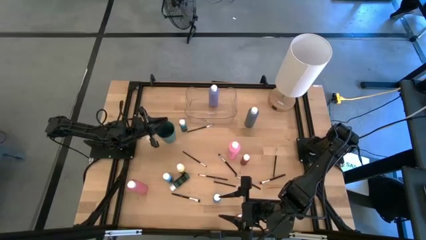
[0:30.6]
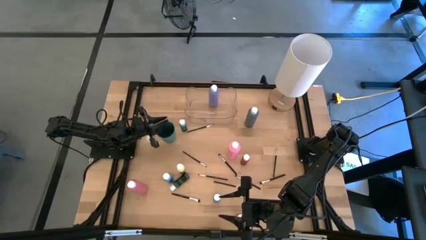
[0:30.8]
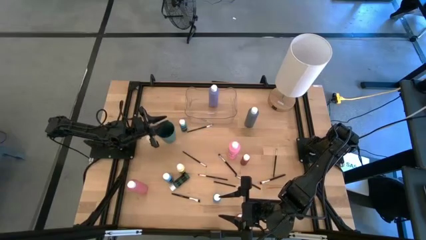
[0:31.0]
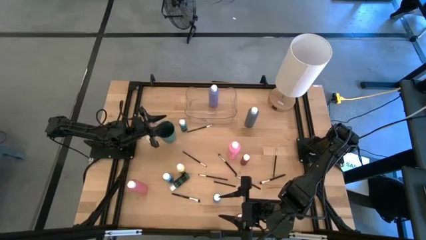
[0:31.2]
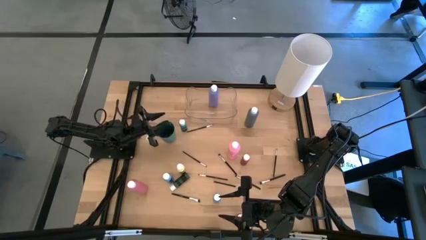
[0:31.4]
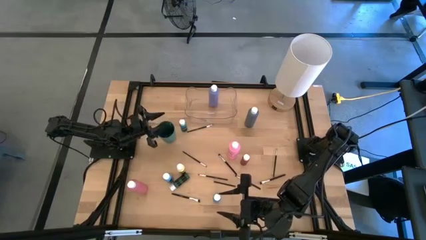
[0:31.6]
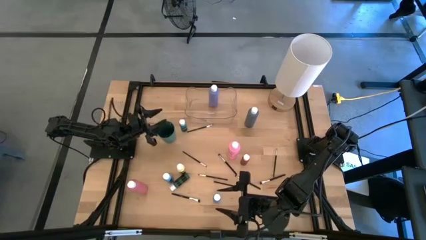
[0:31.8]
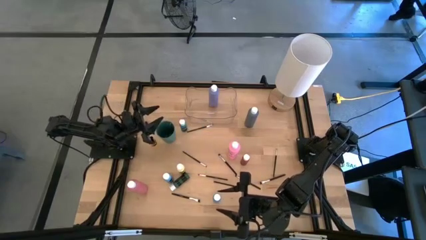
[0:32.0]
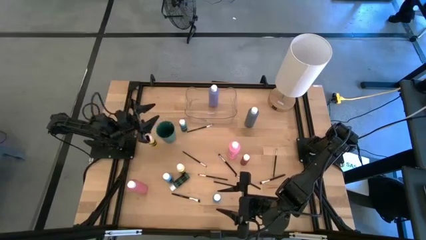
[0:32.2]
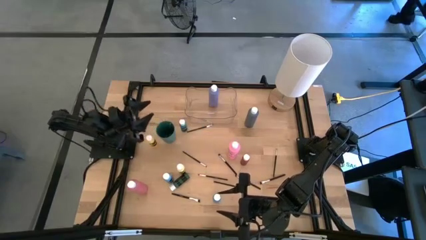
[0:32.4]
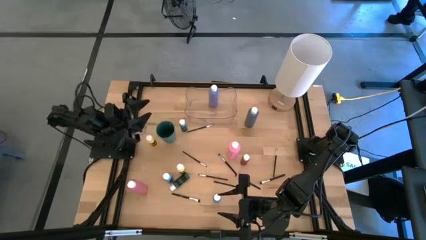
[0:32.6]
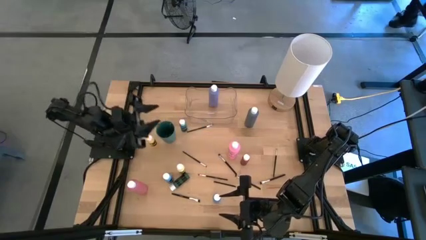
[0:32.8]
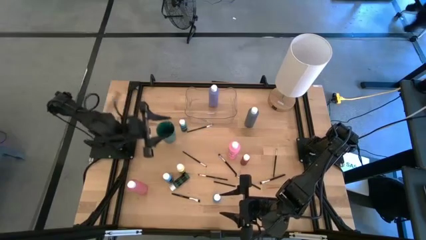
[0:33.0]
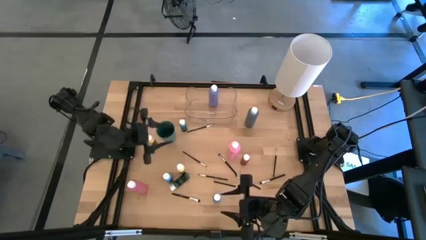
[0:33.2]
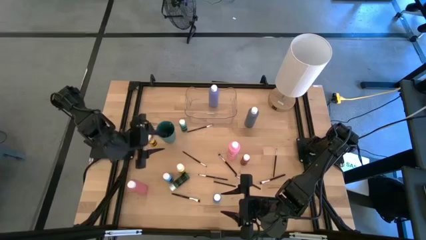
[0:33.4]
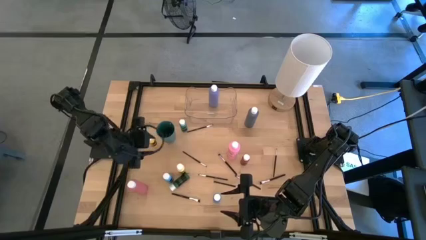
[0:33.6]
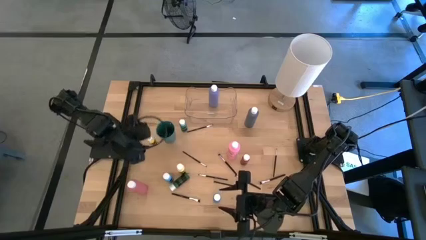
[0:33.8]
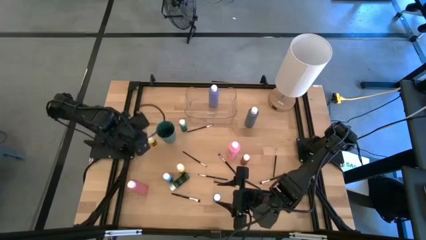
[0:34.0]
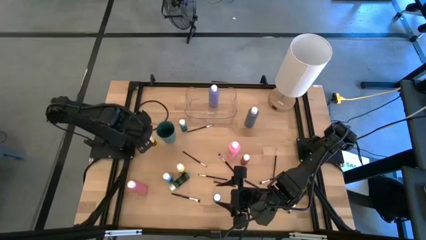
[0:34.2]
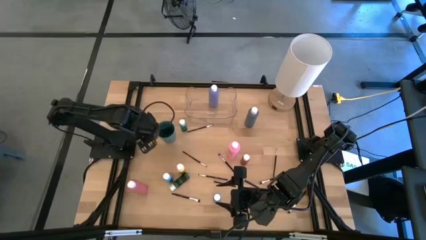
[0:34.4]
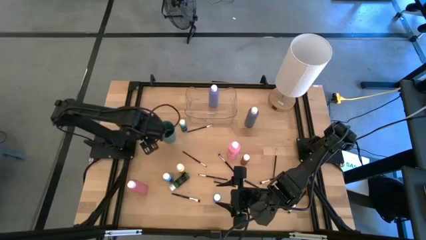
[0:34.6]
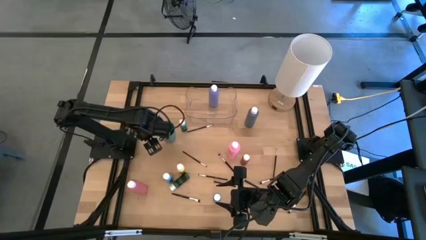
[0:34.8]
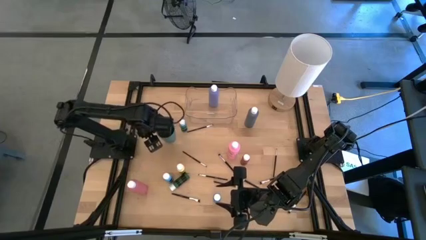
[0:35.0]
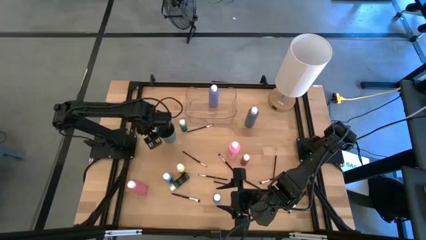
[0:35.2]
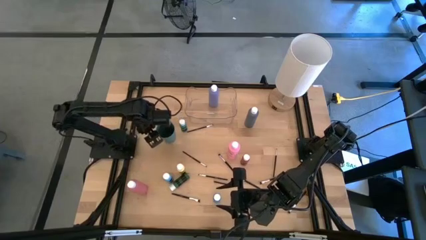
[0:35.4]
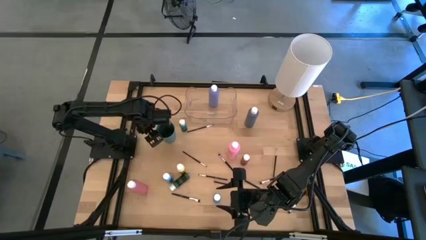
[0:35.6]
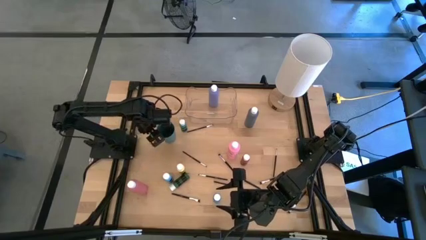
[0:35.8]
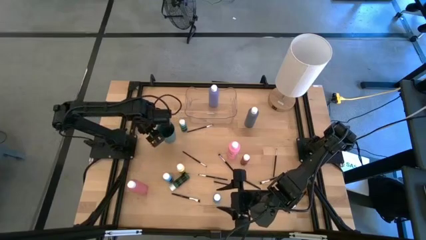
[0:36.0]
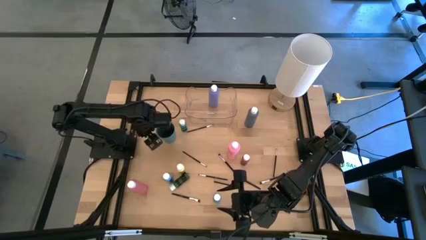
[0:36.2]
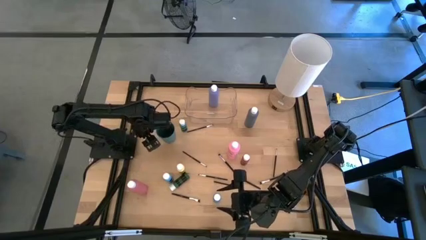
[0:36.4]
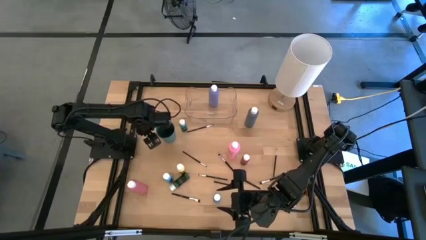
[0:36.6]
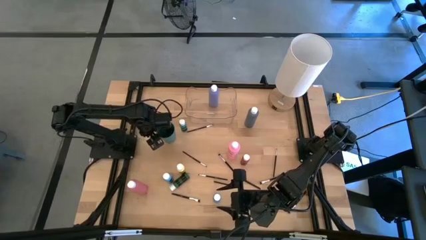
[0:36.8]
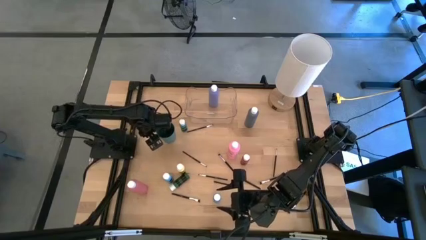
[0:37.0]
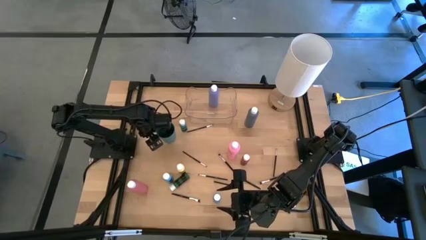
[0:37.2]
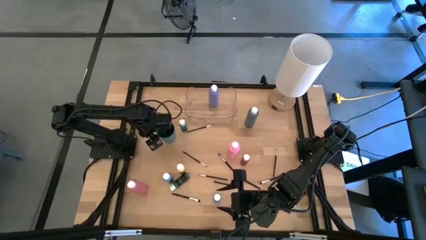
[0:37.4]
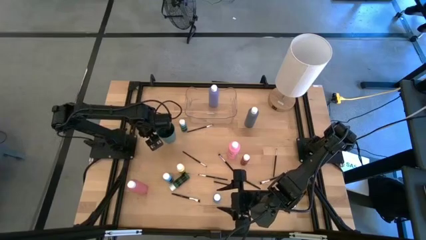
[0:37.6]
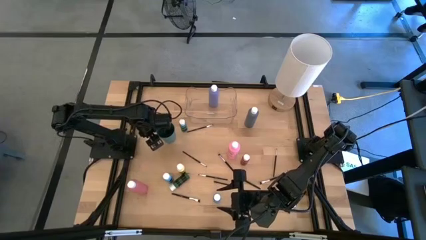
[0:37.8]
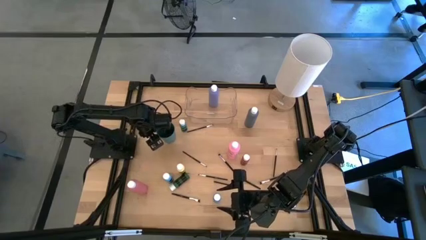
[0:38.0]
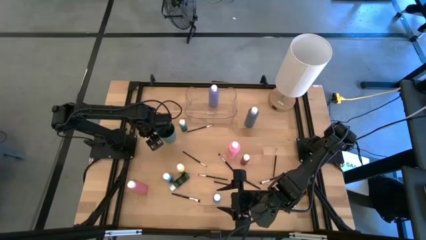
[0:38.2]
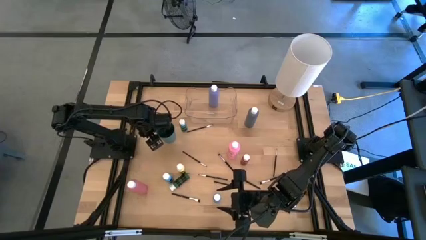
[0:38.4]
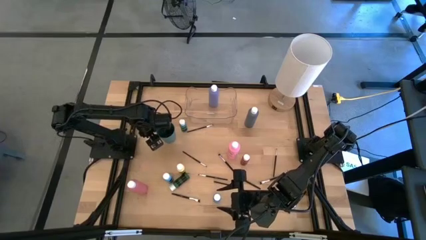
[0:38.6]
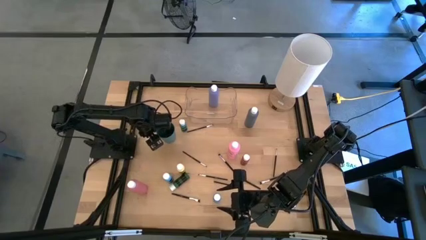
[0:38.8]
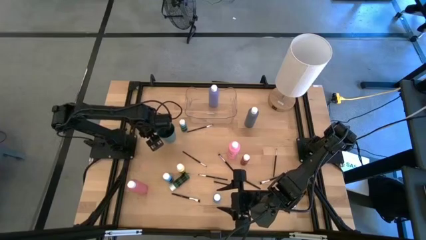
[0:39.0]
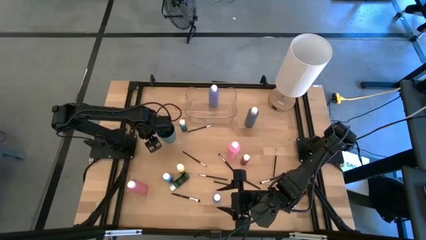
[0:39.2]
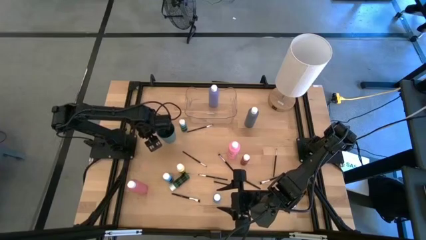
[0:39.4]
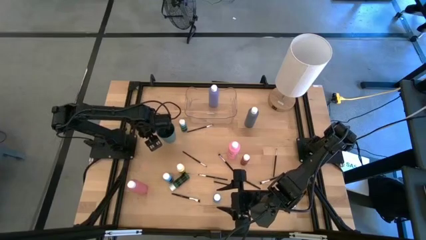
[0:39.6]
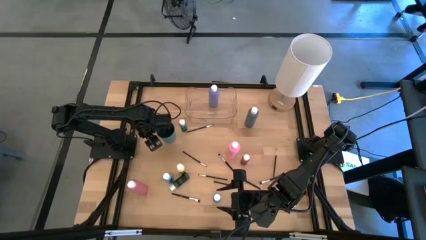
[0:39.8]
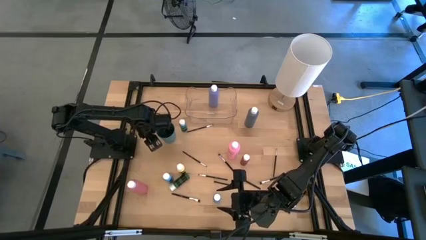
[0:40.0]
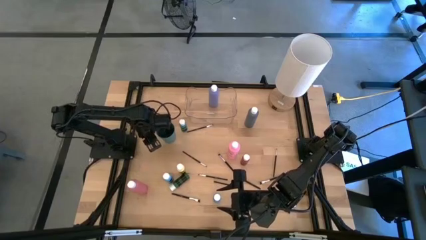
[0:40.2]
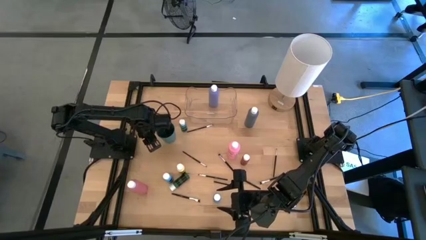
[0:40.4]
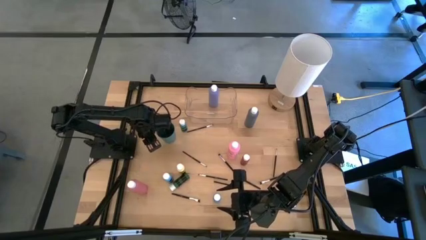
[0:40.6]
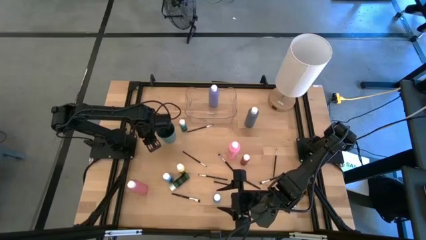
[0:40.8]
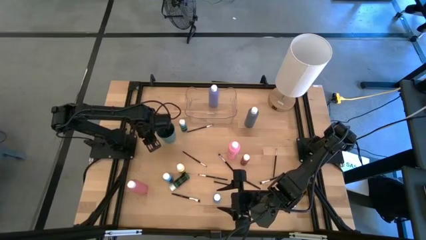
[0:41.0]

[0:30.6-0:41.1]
Task: Pick & Place Paint Supplies
Put the yellow paint bottle into the transparent bin

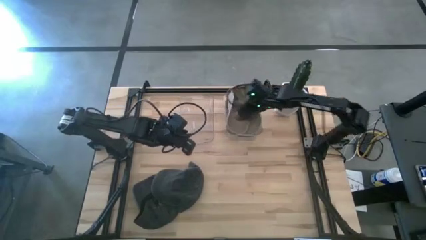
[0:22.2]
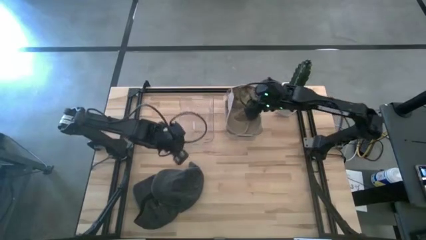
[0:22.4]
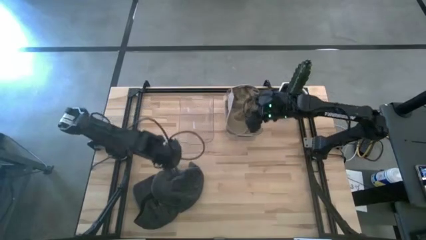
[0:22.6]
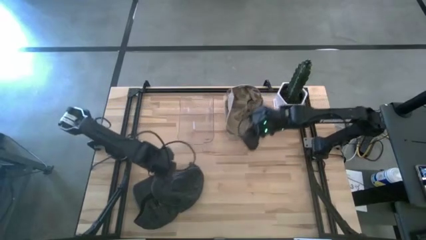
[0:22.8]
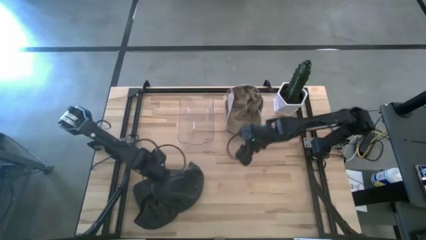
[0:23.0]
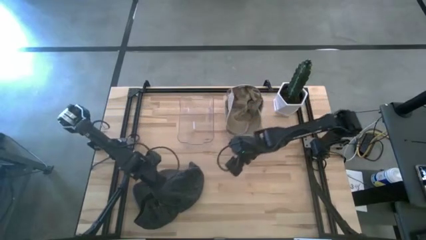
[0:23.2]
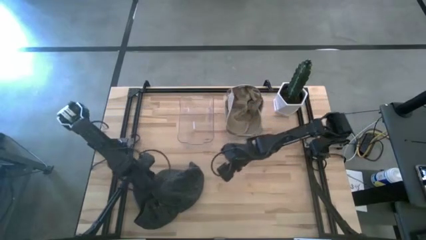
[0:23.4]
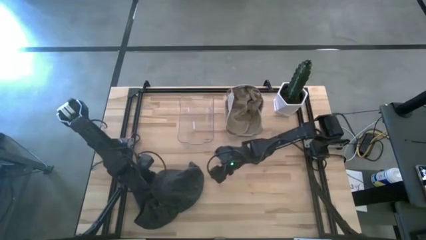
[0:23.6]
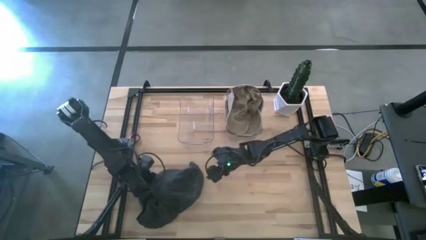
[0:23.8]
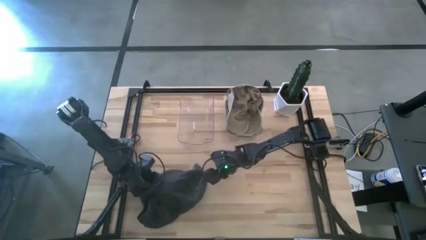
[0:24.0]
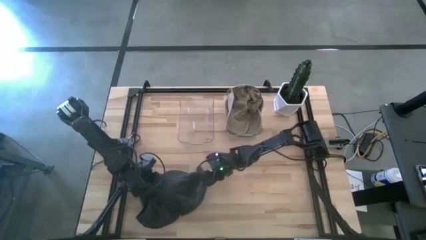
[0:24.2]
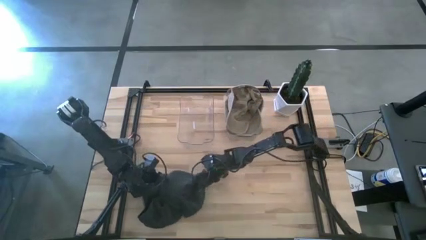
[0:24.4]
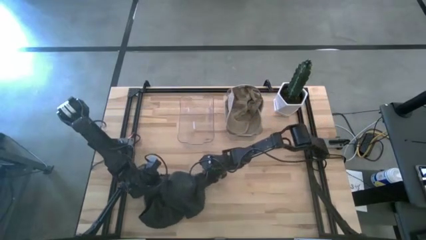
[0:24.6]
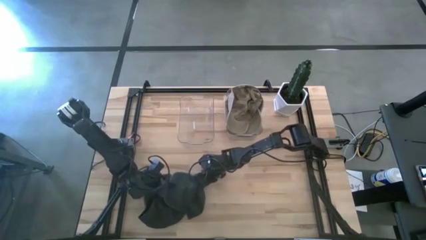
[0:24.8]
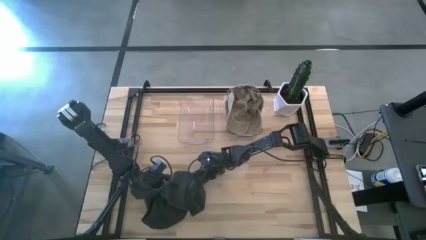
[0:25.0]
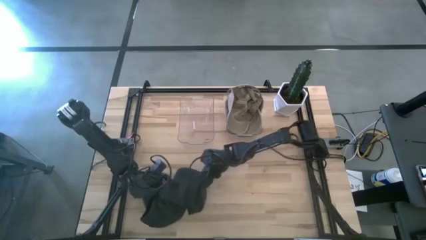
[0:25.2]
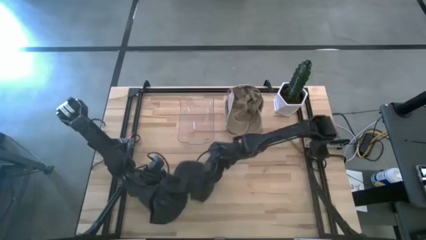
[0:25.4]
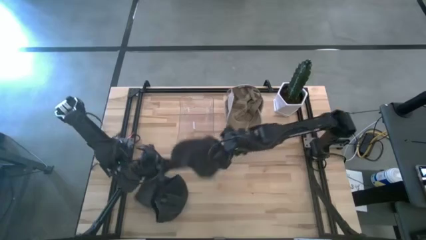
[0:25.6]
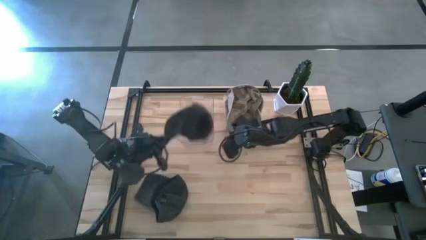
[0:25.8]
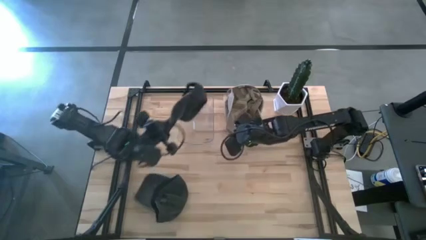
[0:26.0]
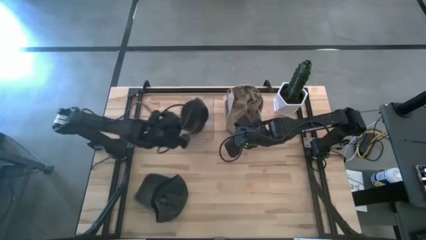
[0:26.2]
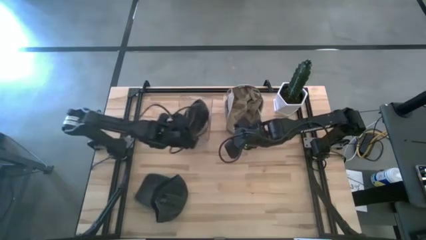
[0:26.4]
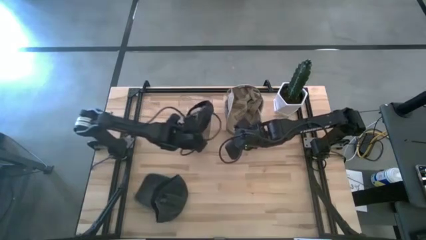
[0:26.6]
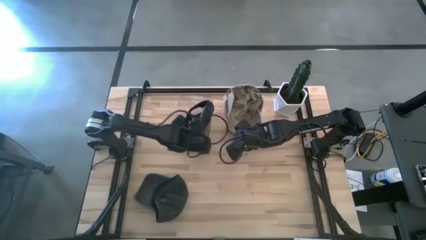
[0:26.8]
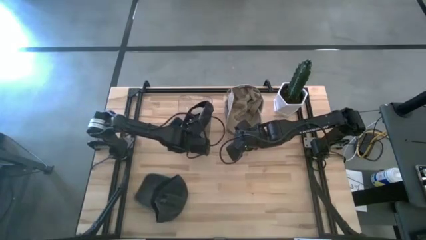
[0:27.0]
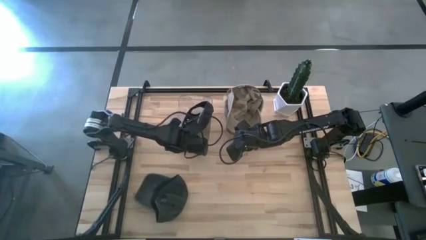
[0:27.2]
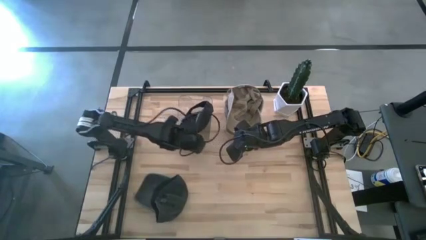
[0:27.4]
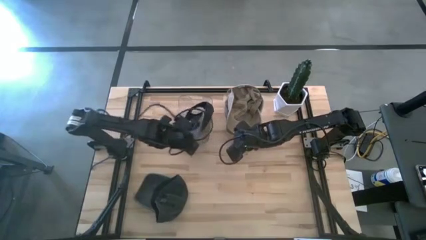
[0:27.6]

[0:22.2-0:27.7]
Task: Pick & Place hat
Put the top black cap into the left transparent bin
